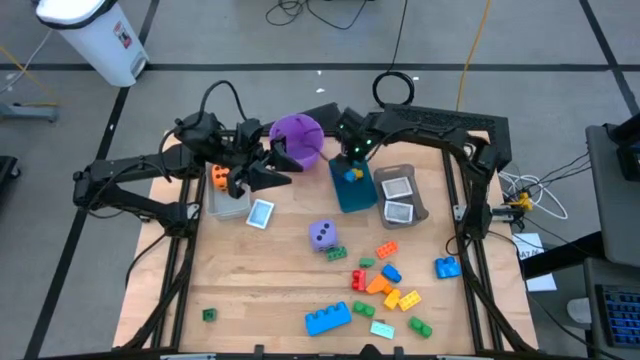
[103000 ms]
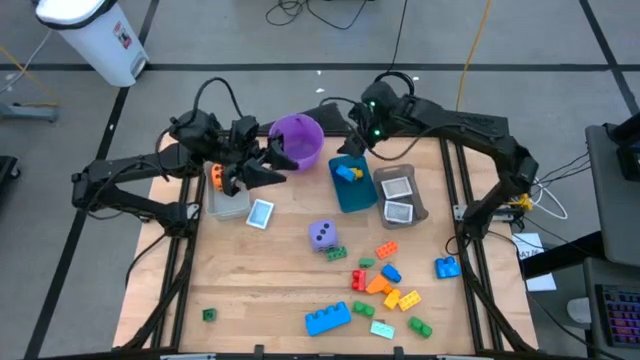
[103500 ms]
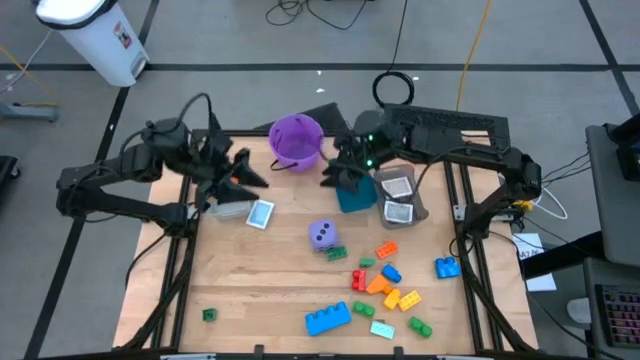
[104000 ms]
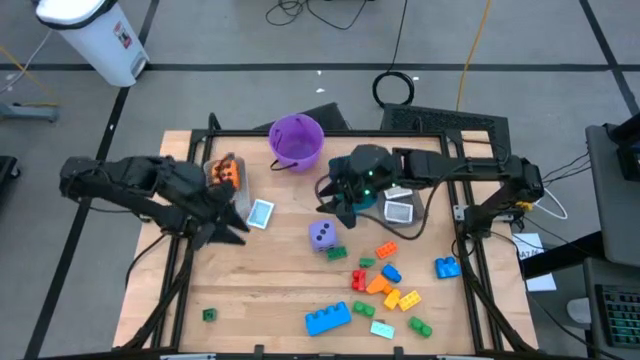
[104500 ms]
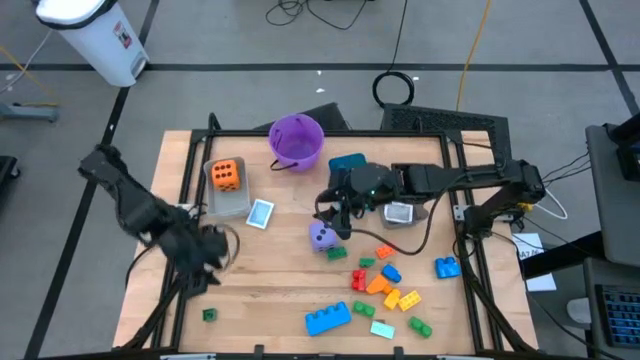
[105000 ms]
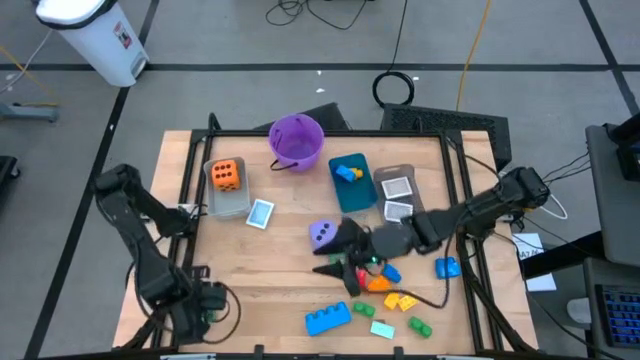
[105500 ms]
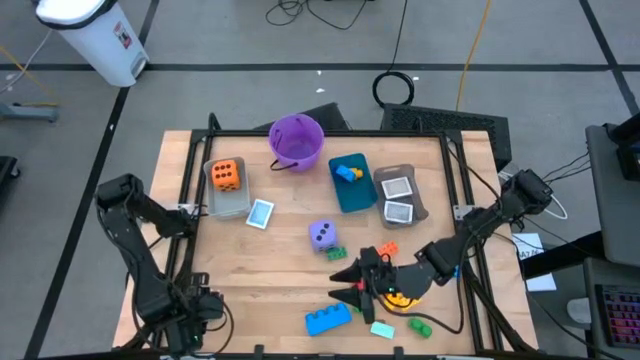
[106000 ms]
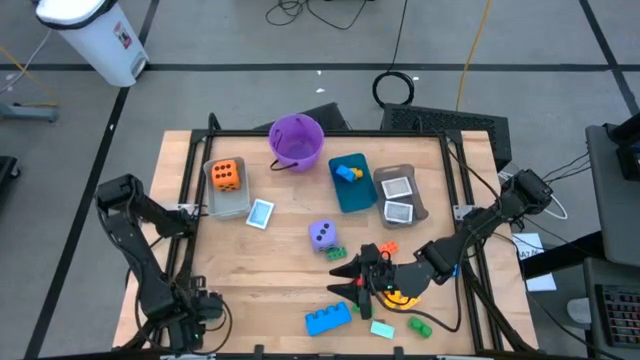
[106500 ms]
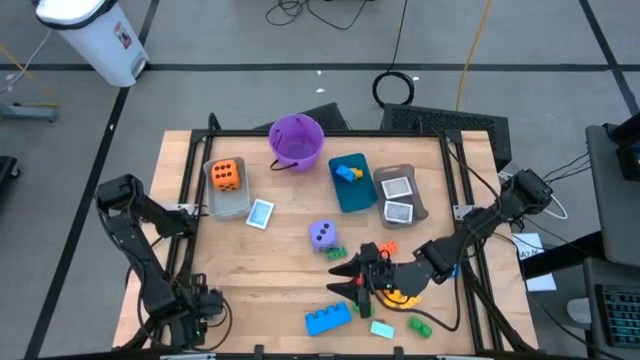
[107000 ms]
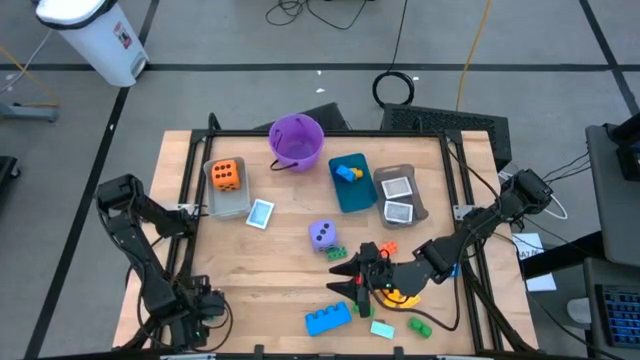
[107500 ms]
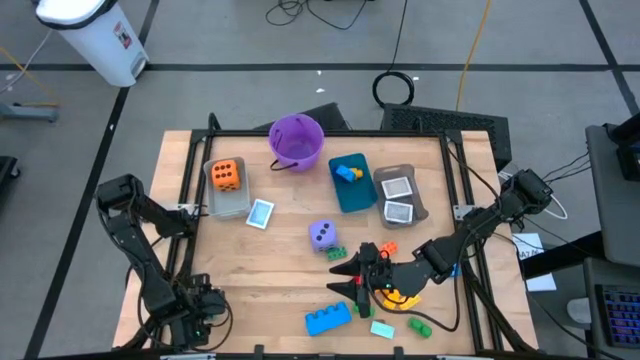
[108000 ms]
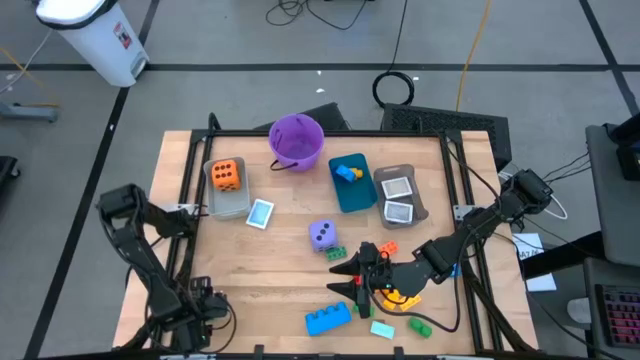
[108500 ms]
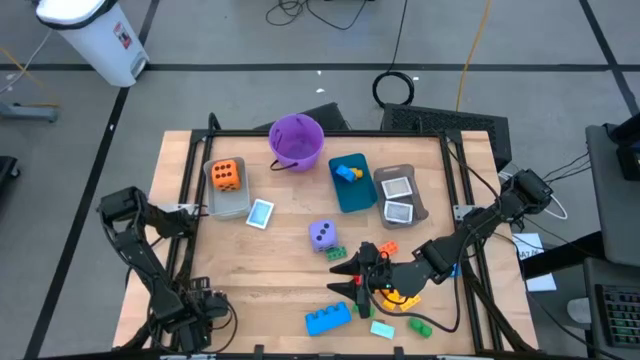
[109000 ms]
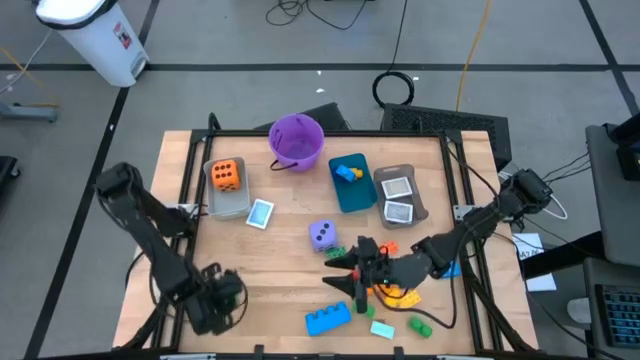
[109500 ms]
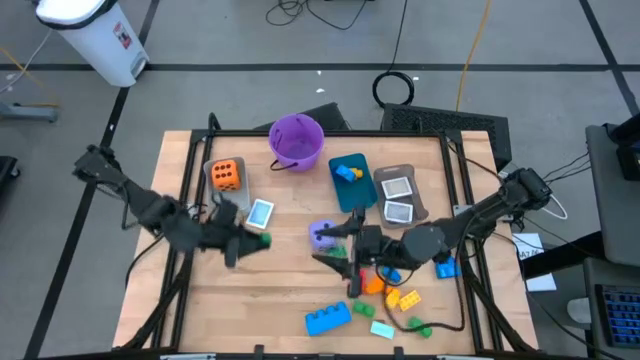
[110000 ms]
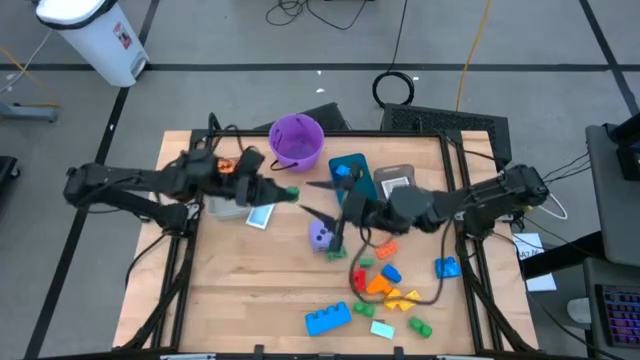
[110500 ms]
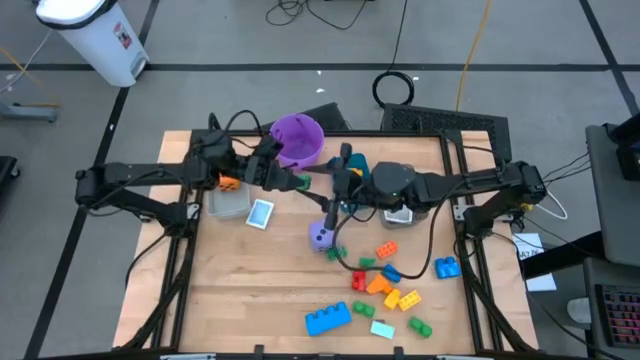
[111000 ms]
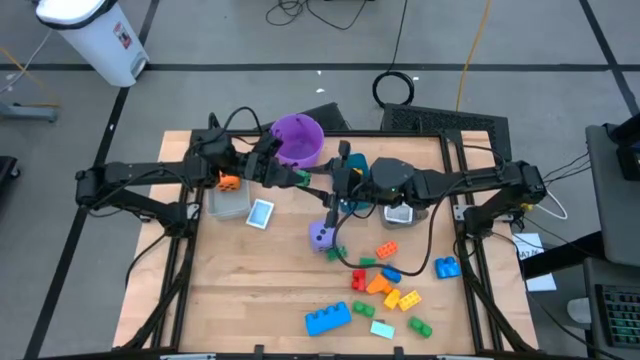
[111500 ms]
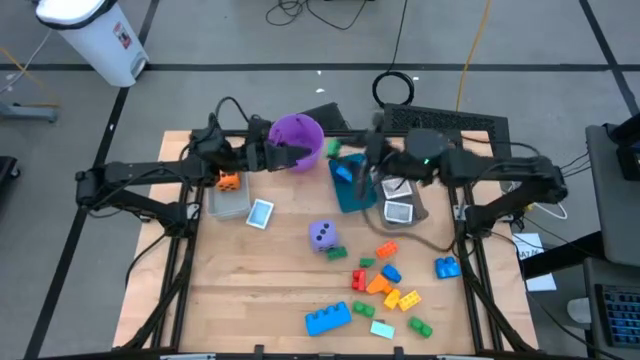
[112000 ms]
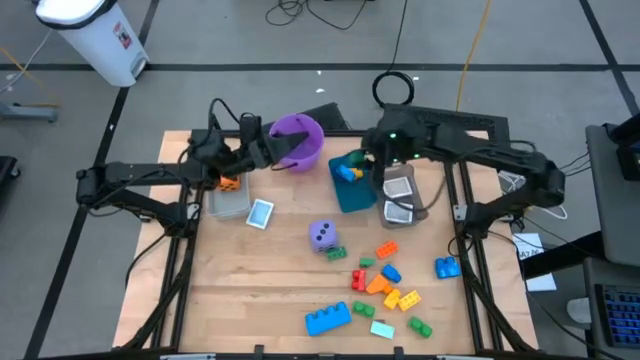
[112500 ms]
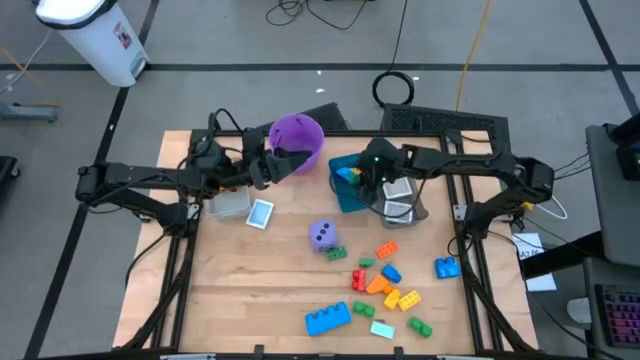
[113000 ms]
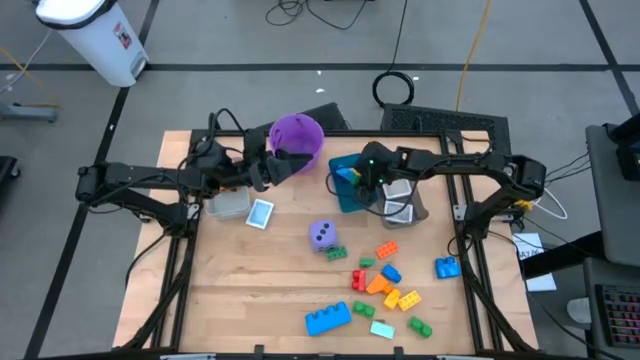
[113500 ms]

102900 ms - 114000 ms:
Task: Pick & Place Toys
Put the green game piece into the blue bin

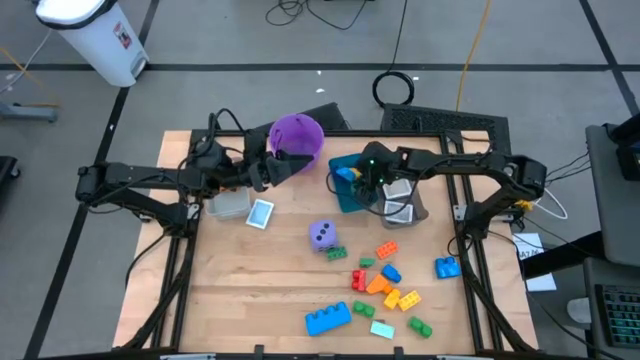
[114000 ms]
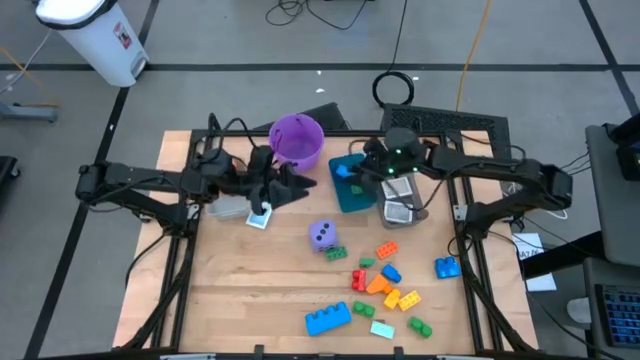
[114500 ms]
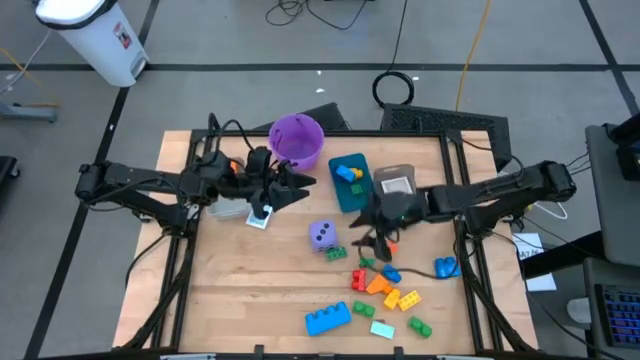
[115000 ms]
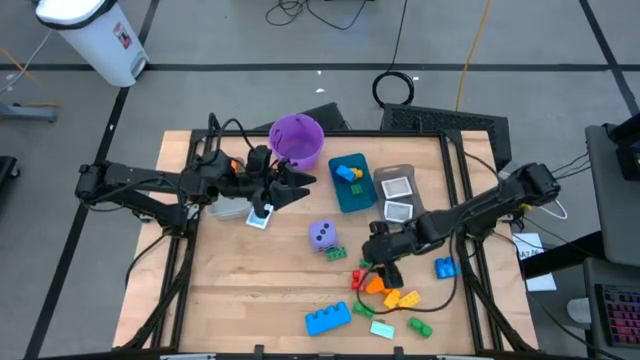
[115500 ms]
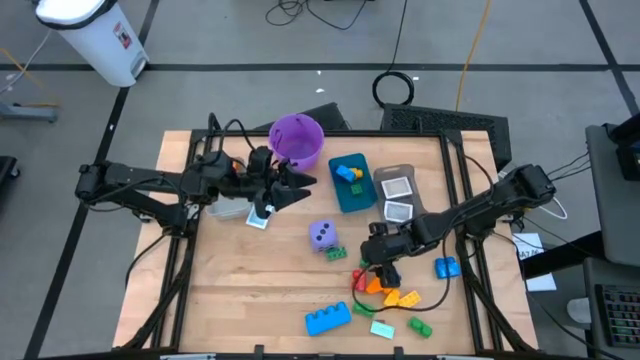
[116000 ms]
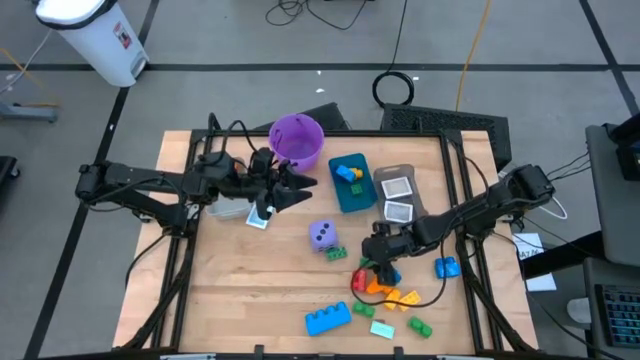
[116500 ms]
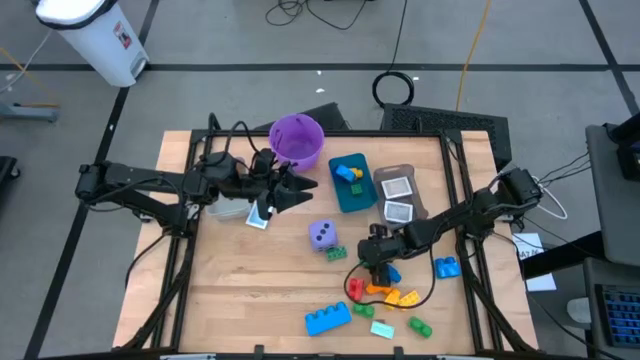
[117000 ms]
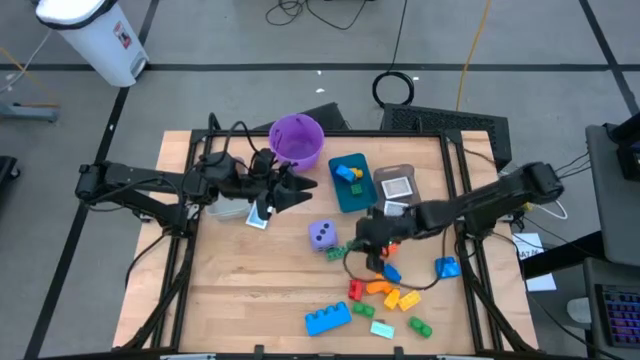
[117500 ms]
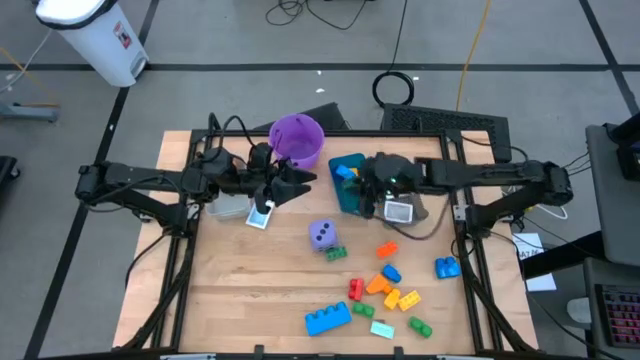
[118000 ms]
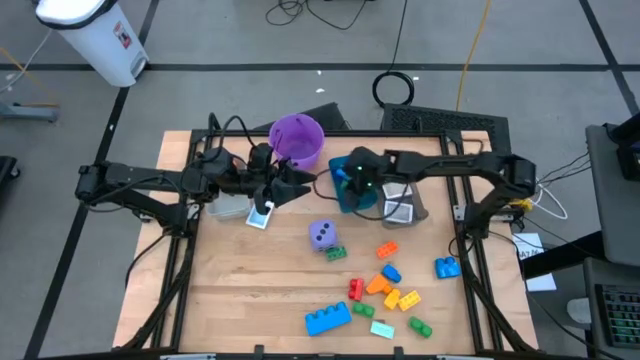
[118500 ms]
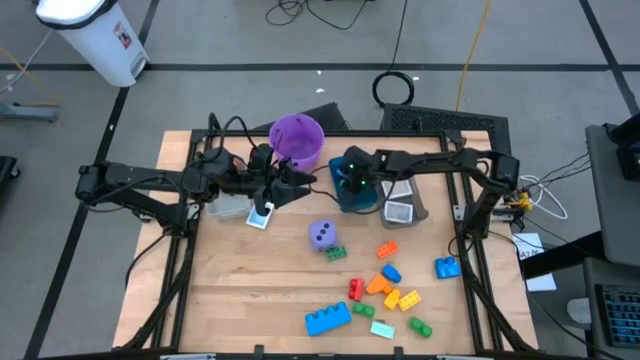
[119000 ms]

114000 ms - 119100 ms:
Put the green game piece into the blue bin
